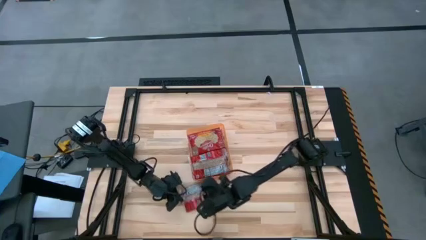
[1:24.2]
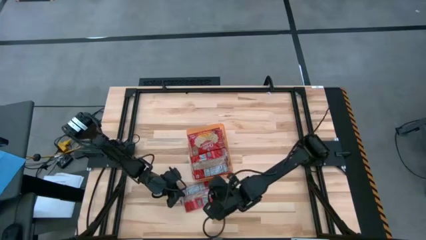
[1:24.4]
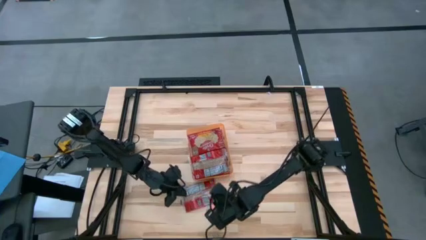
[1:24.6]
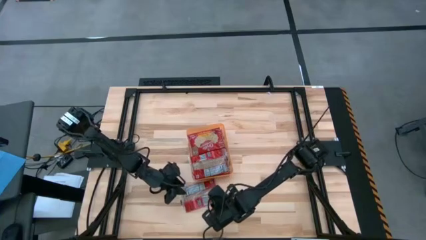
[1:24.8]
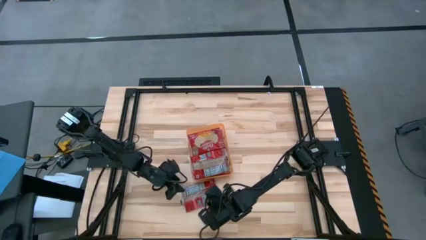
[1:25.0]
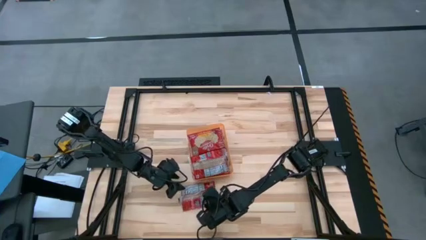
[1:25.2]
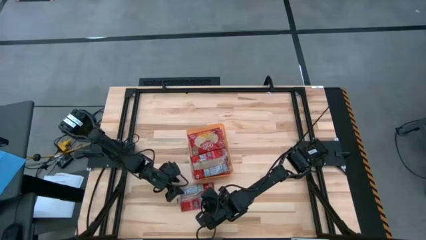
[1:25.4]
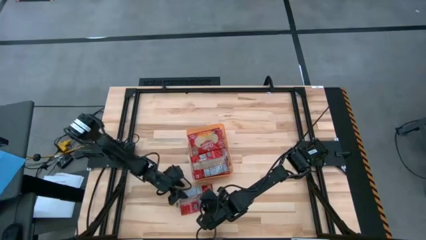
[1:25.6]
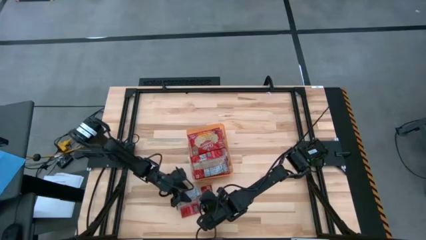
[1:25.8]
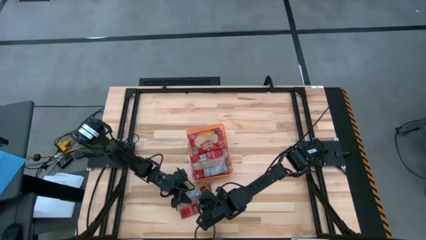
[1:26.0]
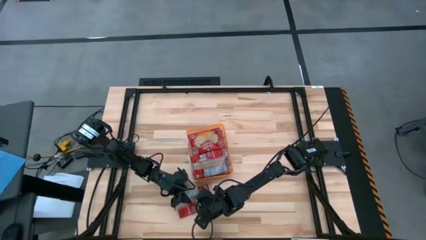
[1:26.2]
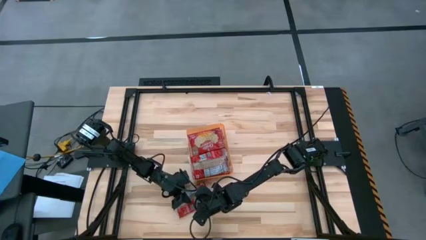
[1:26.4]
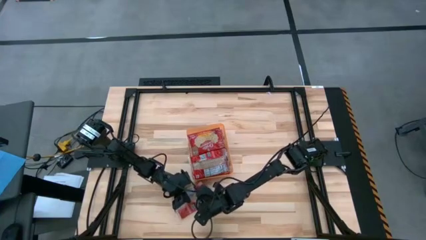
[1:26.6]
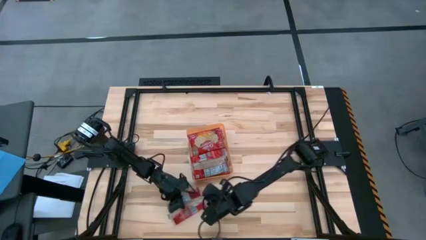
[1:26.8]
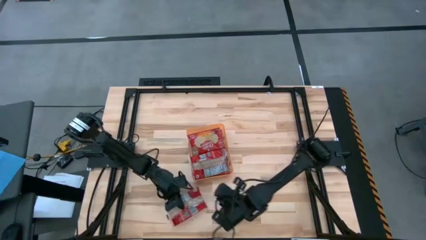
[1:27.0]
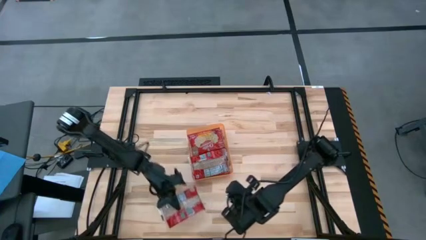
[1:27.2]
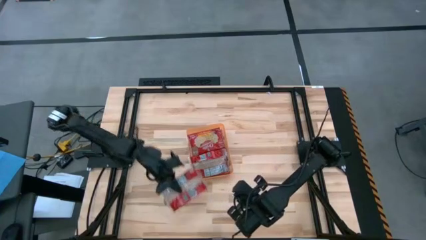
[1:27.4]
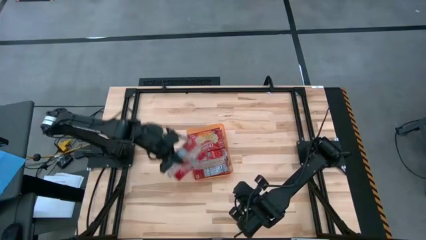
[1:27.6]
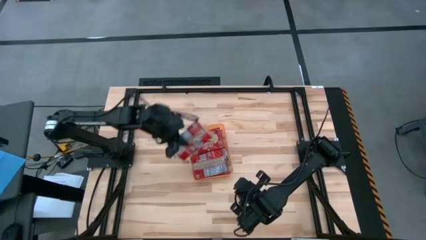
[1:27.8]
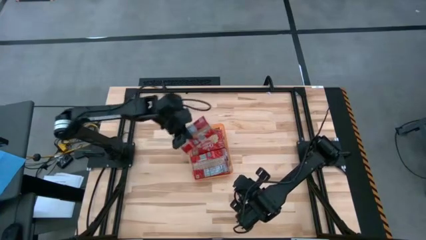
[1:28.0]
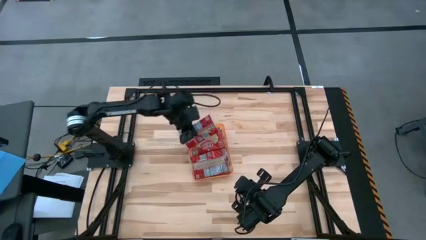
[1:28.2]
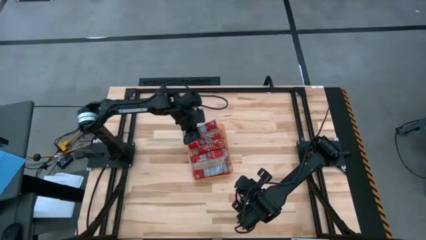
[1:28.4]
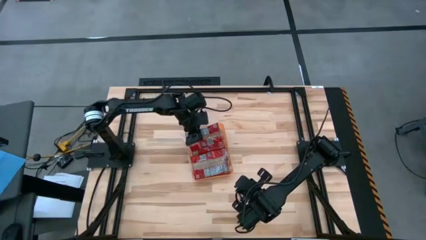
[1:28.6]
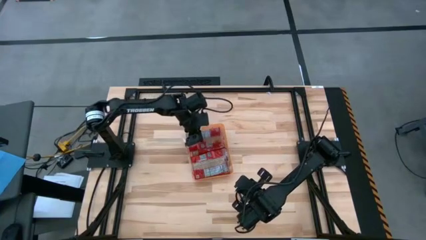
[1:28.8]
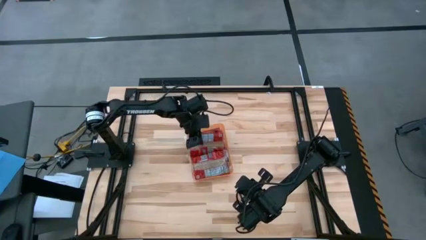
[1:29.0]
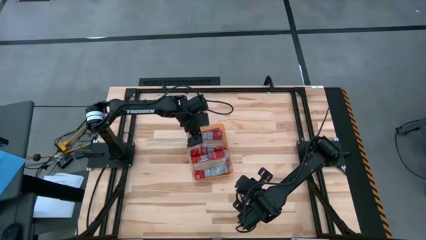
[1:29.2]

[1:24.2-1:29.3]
Task: Sort popcorn bags into baskets
Put the red popcorn bag into the orange bin

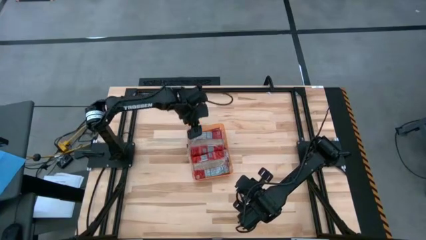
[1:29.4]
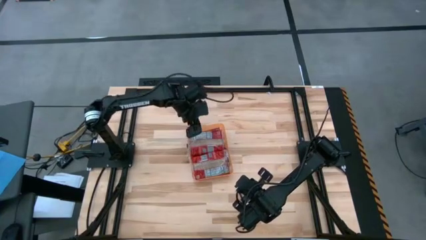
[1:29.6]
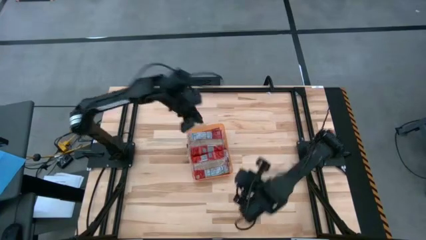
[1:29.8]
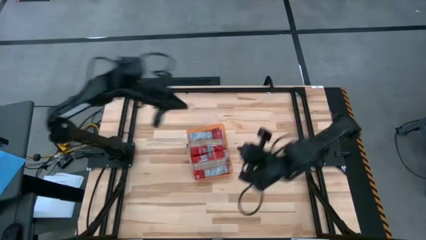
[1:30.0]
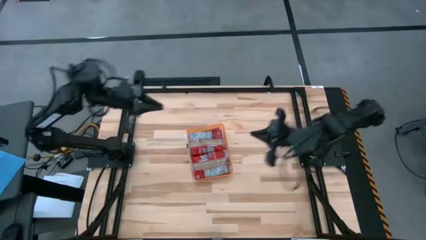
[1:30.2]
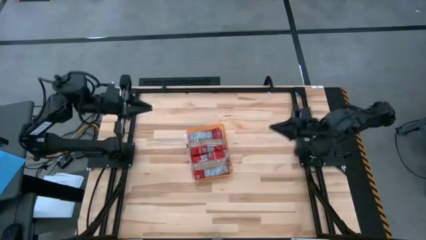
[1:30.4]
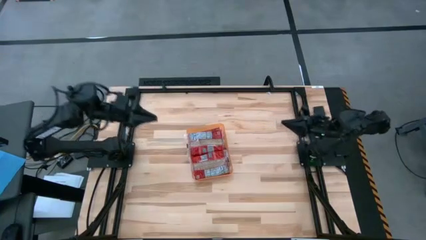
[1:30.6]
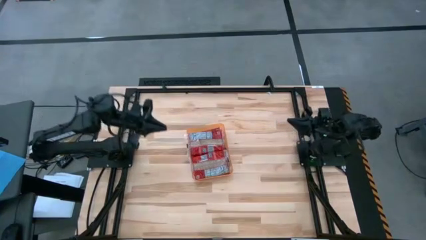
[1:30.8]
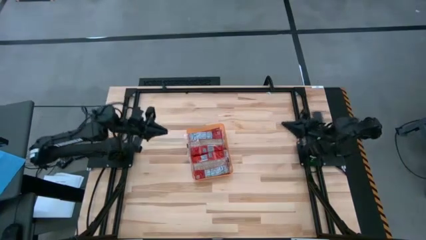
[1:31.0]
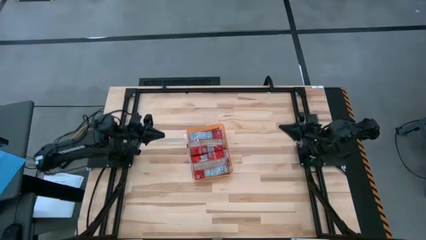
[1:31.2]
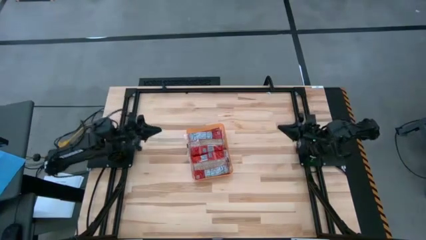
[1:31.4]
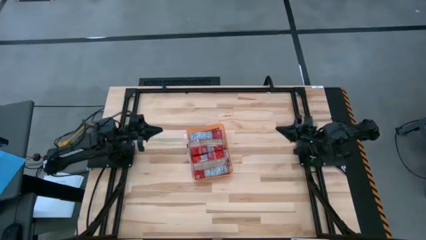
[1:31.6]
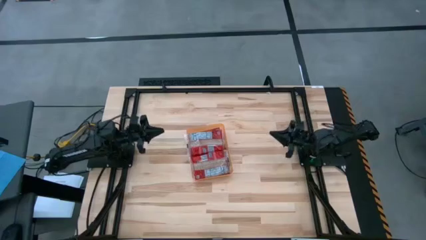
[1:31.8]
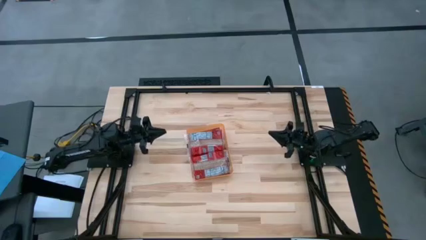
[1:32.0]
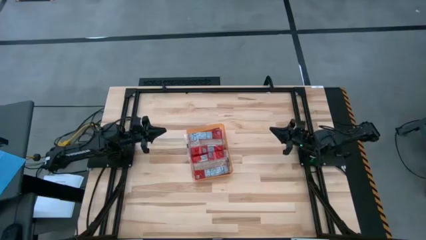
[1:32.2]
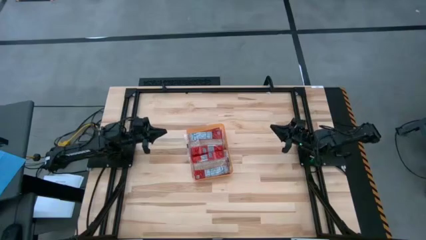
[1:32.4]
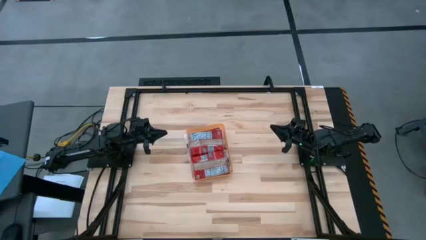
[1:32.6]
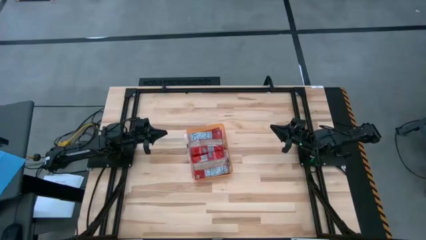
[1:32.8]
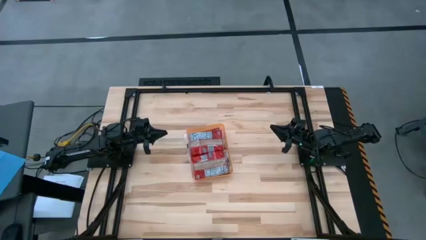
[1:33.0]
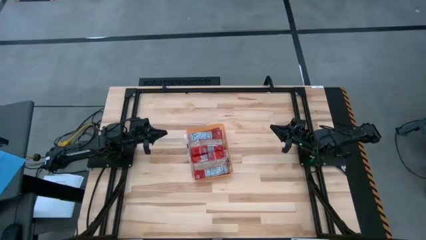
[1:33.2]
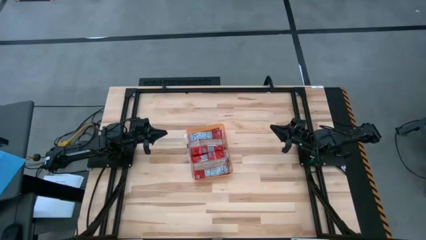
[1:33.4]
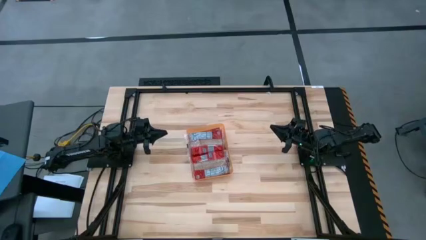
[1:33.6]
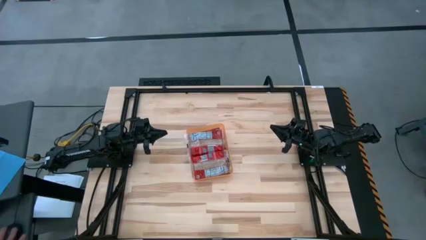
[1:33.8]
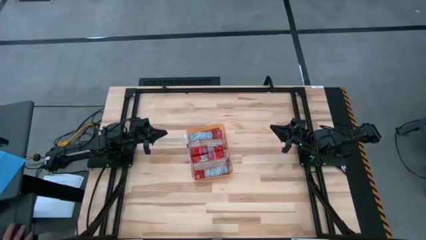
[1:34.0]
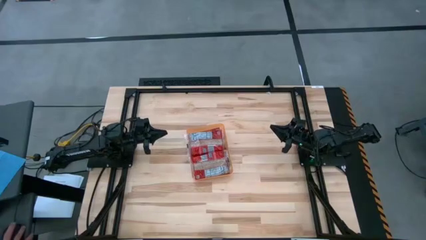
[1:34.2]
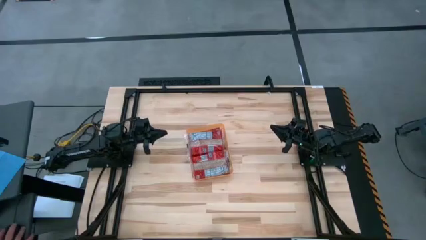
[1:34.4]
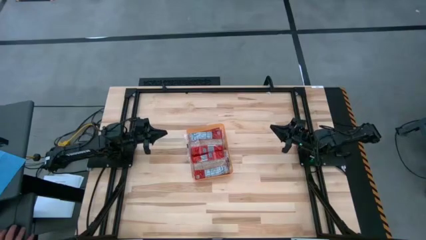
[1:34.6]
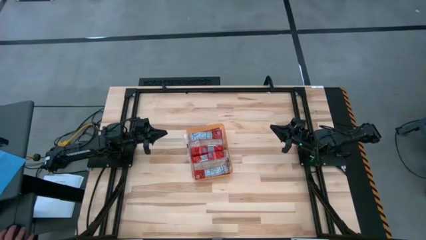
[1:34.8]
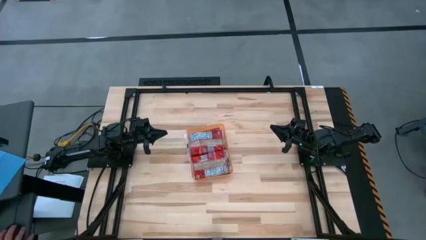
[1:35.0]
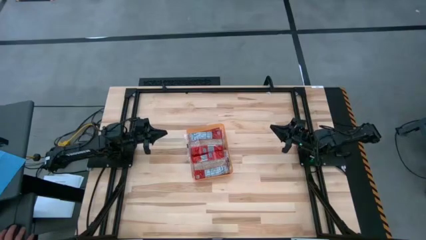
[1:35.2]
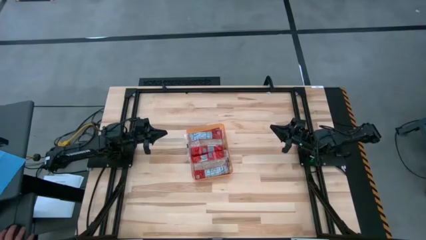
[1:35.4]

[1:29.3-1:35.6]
Return to Home Position

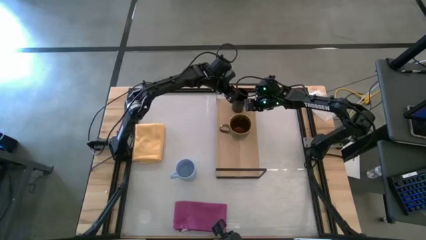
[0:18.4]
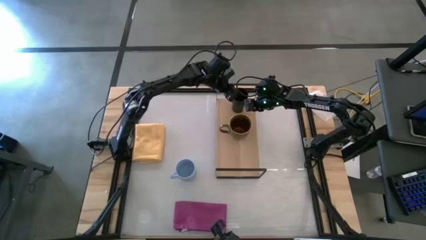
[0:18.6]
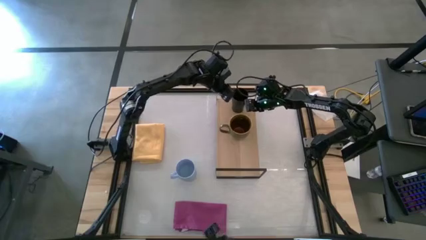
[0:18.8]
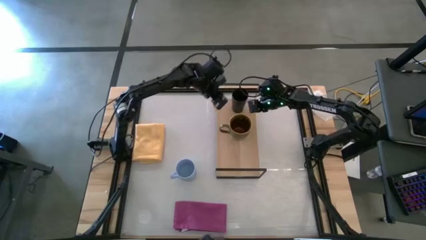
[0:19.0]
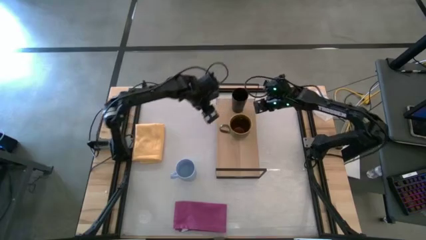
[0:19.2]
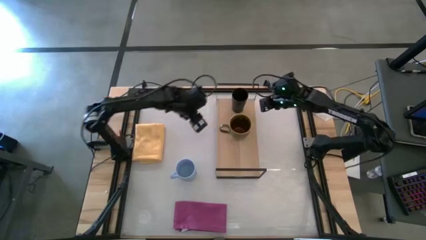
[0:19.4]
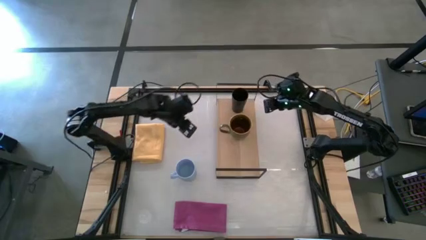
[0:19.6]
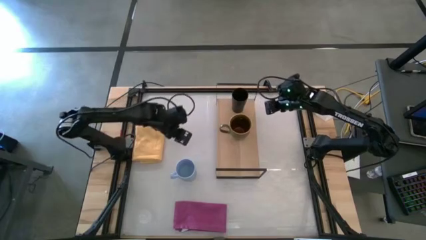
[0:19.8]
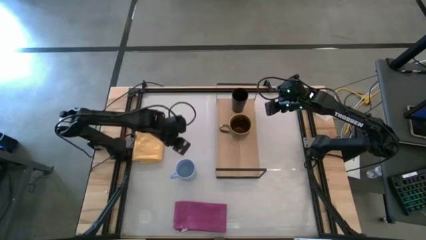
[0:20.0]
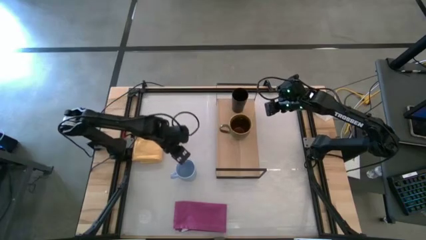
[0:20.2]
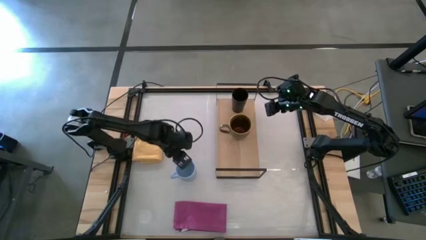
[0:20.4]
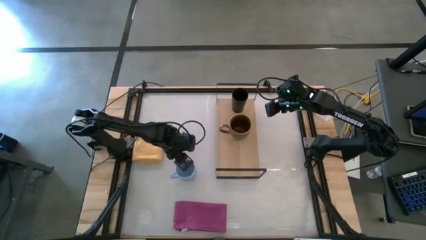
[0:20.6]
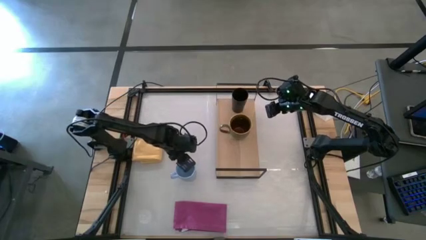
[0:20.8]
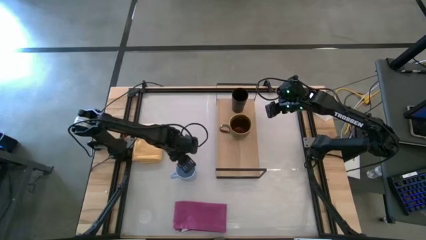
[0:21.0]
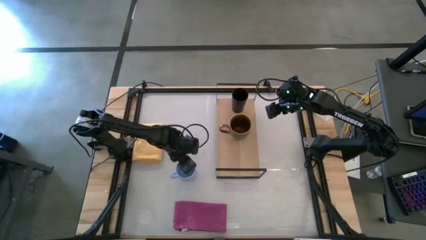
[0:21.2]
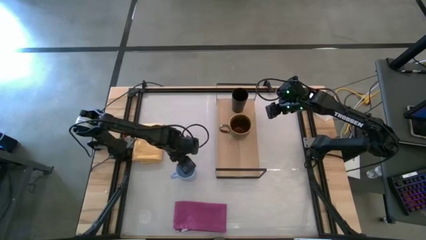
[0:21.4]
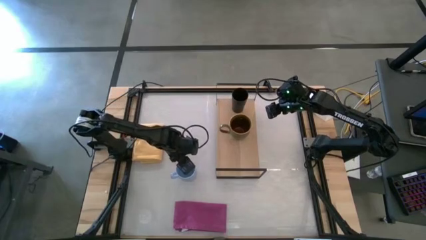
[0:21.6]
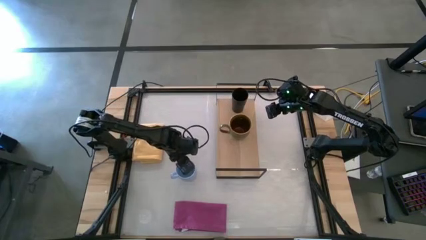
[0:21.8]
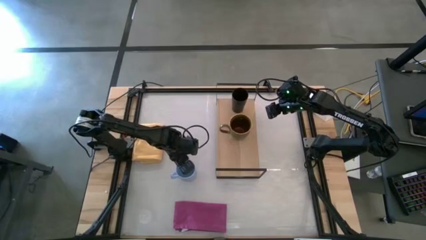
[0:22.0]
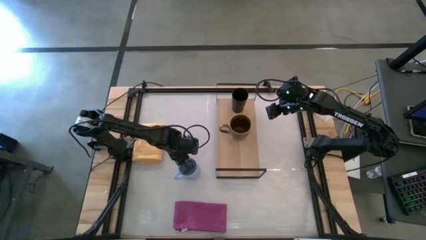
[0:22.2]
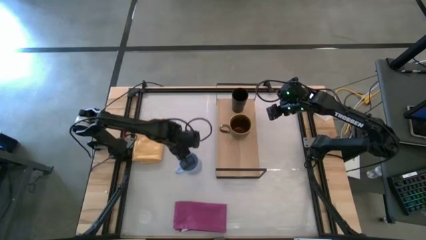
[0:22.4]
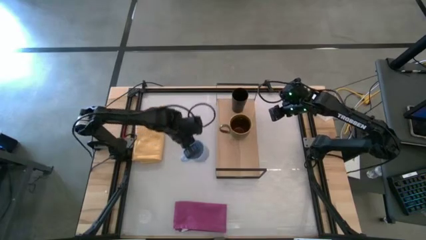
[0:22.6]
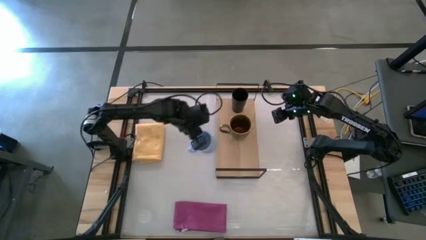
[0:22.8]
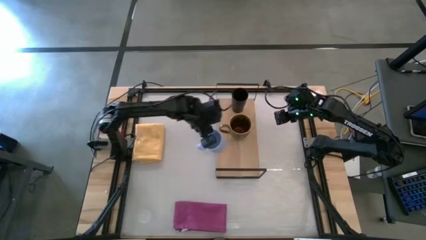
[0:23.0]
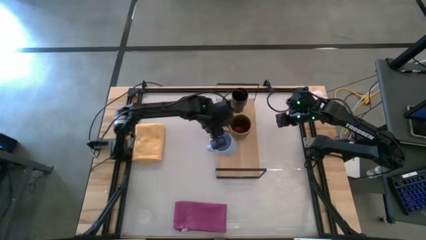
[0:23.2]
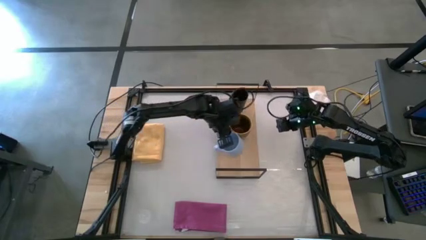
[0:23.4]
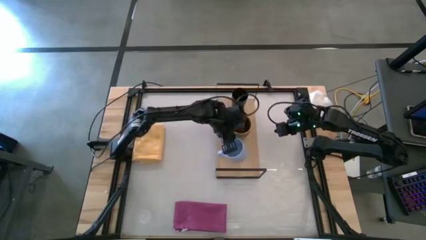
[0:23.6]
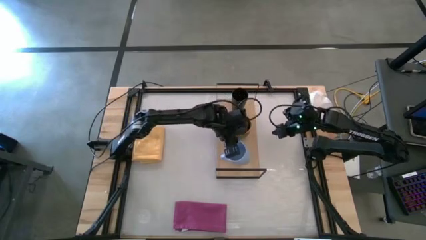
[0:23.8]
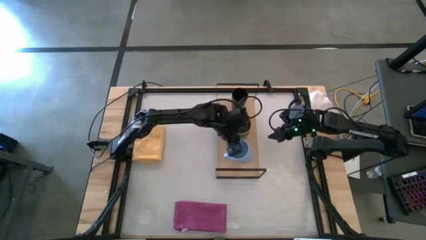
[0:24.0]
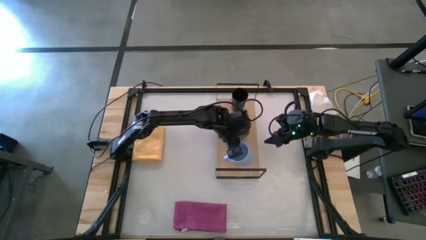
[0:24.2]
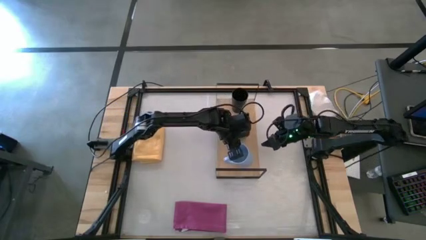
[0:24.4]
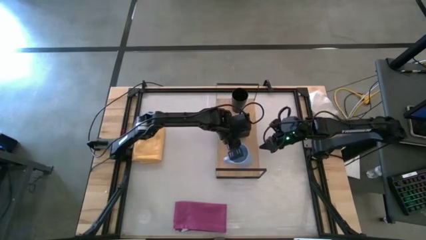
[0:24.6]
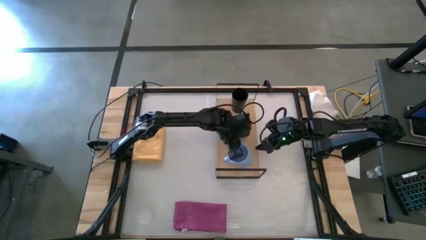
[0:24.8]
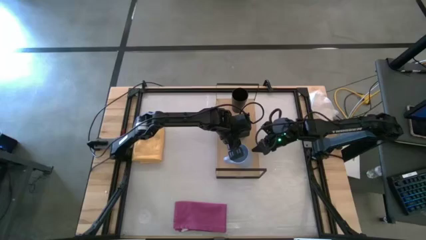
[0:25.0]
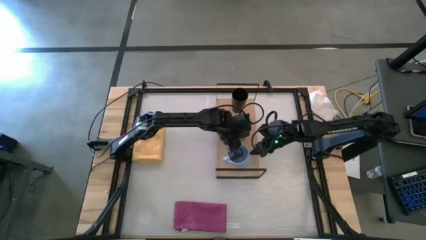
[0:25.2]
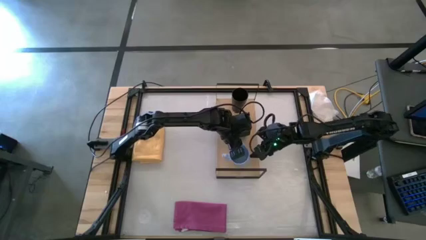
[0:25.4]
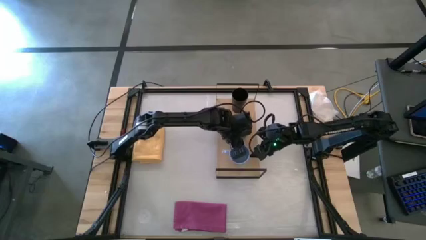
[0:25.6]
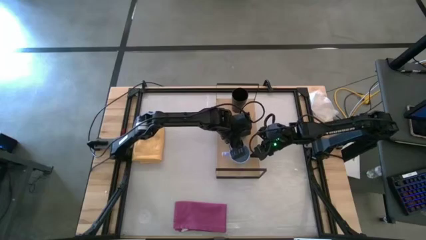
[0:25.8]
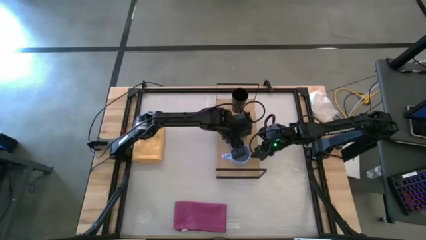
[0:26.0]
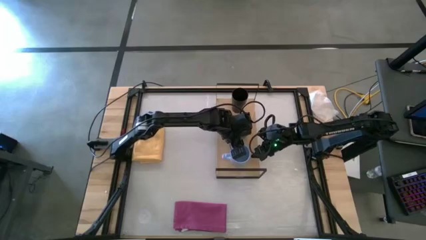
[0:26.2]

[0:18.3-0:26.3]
Task: Stack small to large cups/mugs on shelf
Put the blue mug on the shelf
